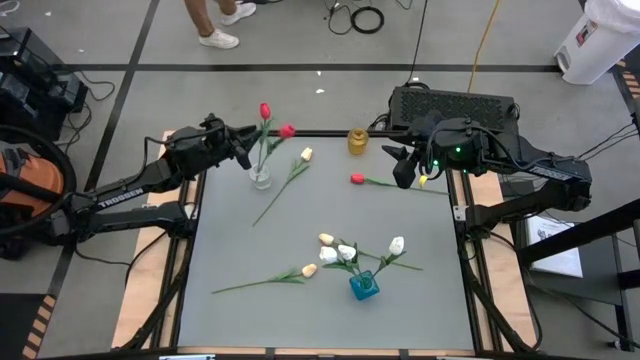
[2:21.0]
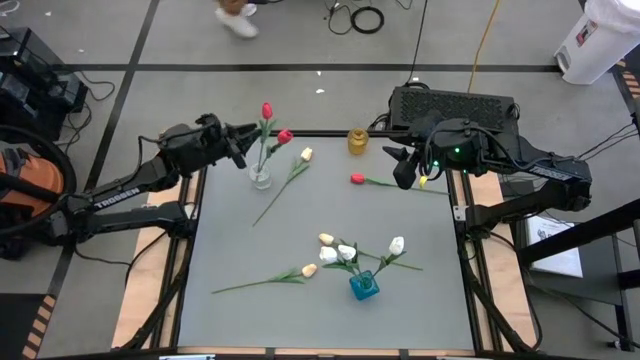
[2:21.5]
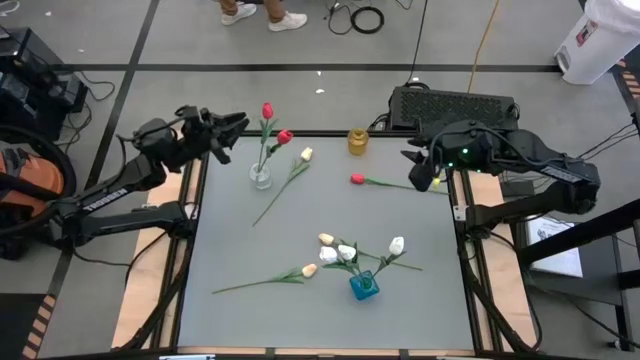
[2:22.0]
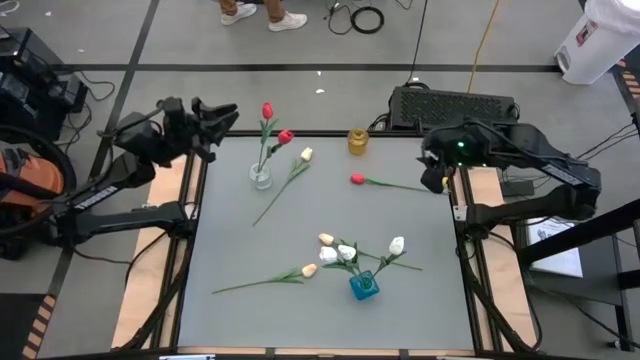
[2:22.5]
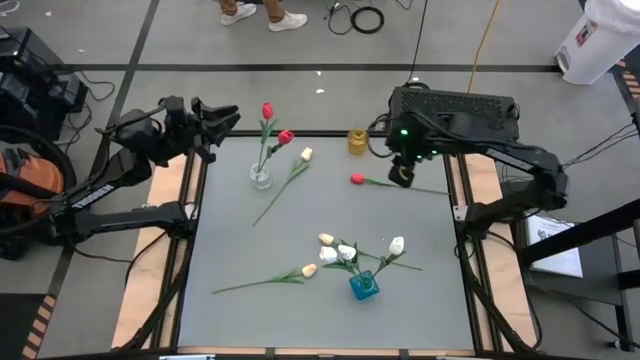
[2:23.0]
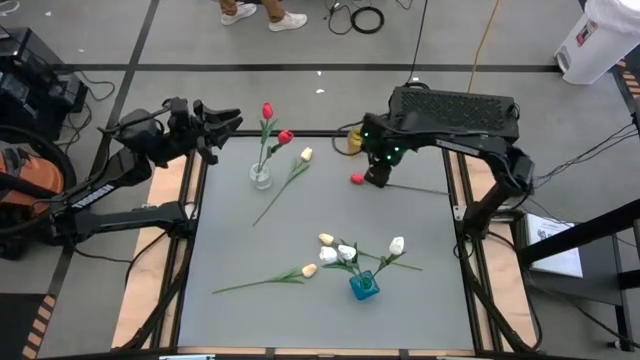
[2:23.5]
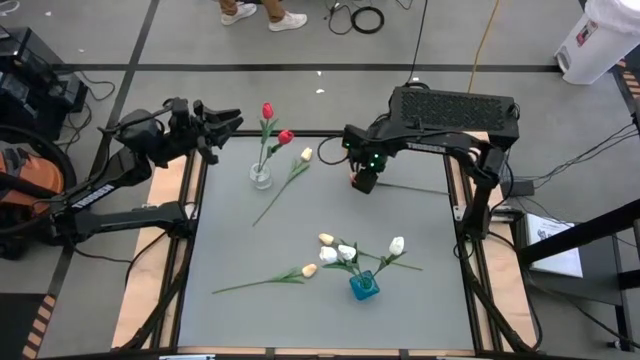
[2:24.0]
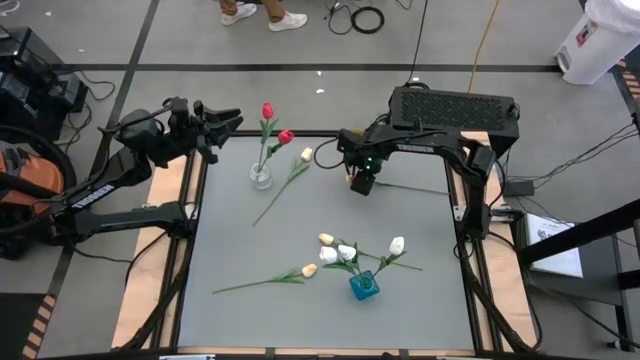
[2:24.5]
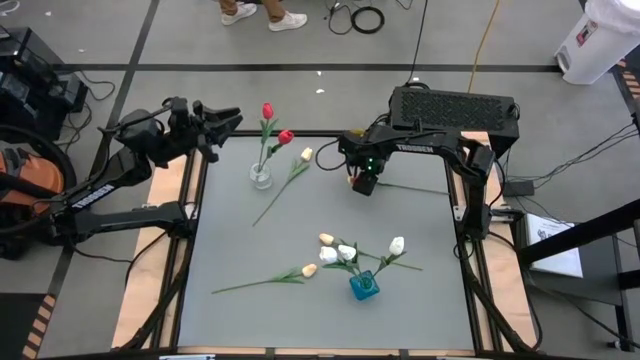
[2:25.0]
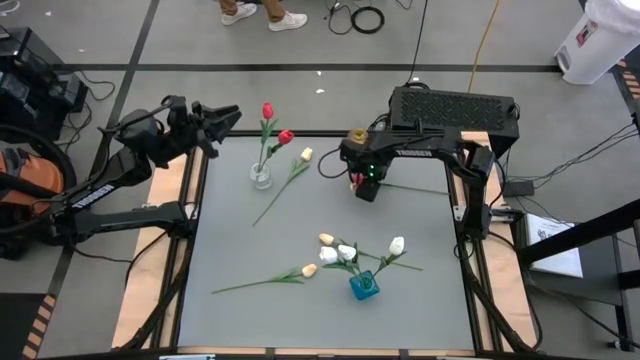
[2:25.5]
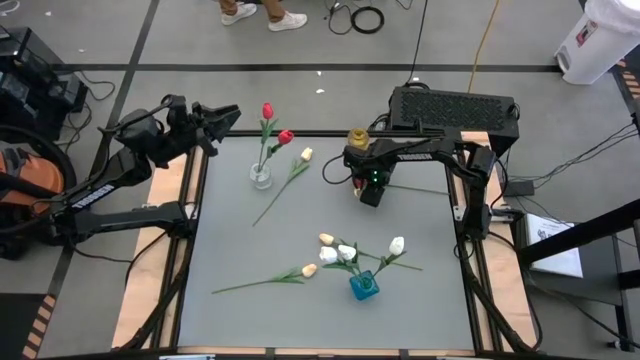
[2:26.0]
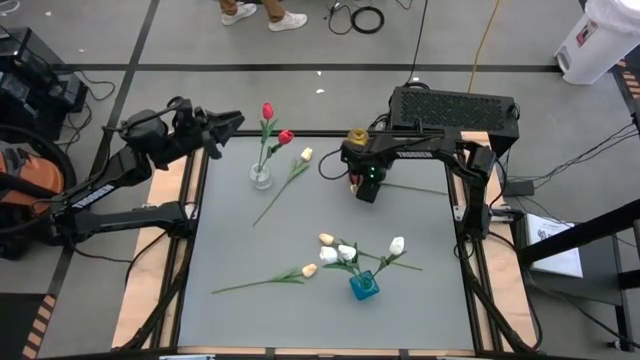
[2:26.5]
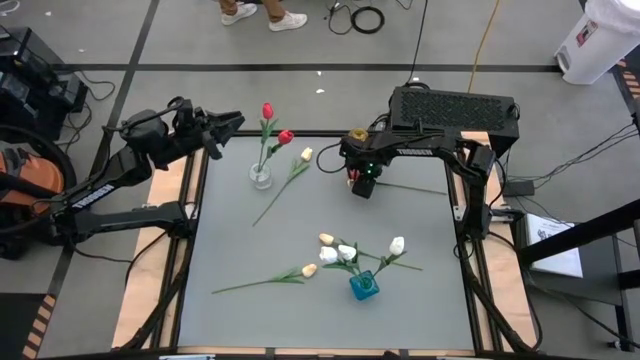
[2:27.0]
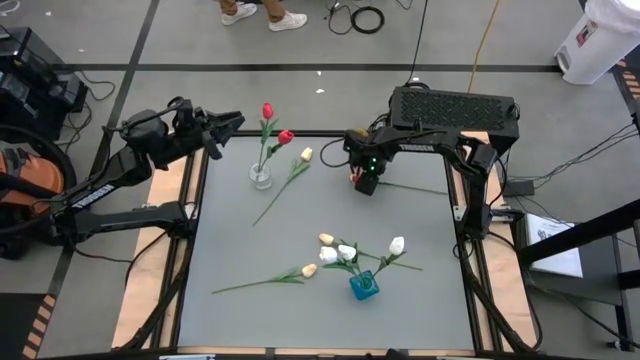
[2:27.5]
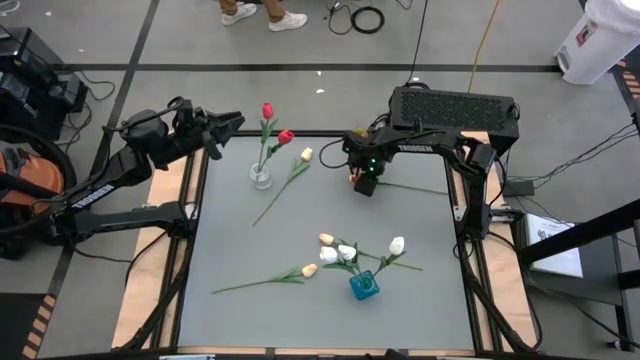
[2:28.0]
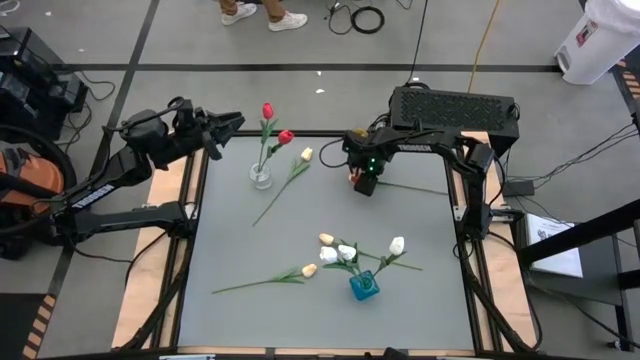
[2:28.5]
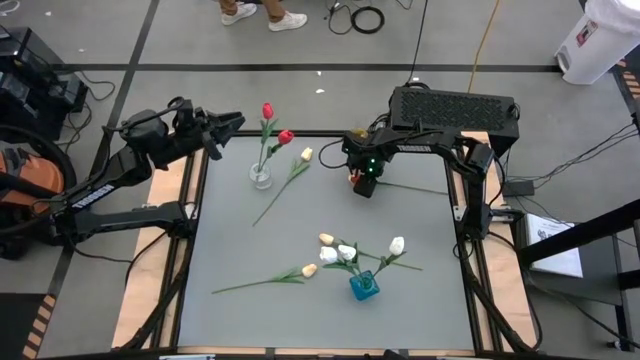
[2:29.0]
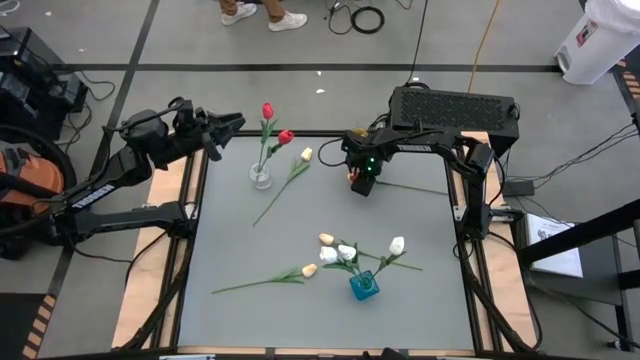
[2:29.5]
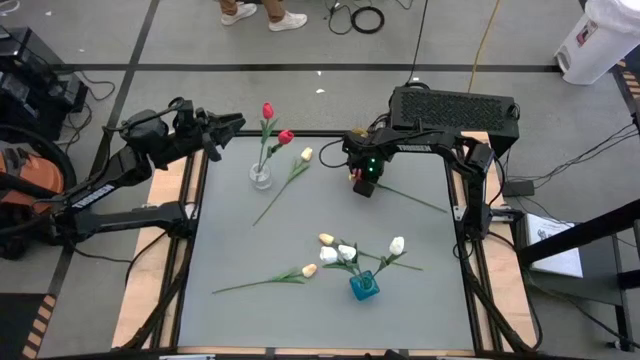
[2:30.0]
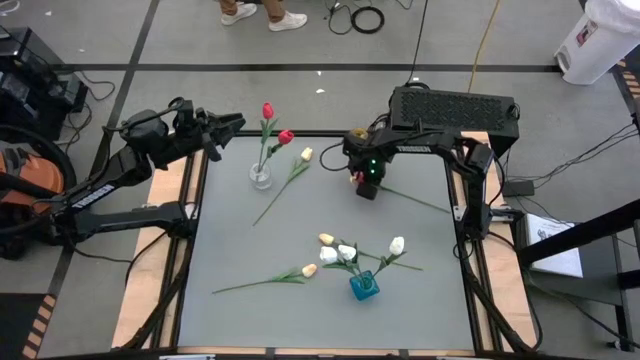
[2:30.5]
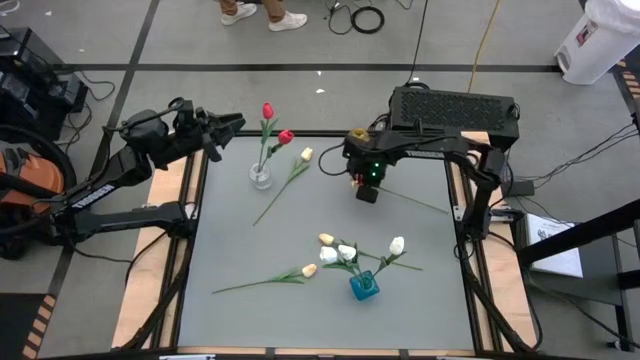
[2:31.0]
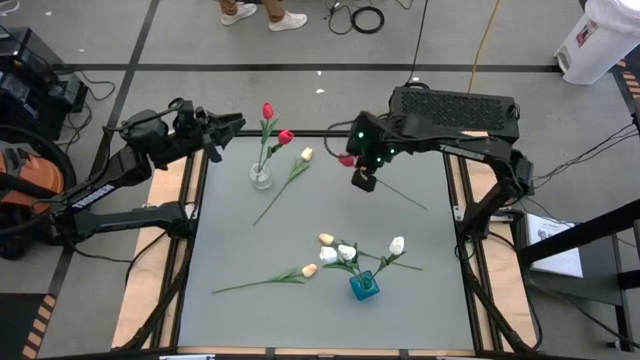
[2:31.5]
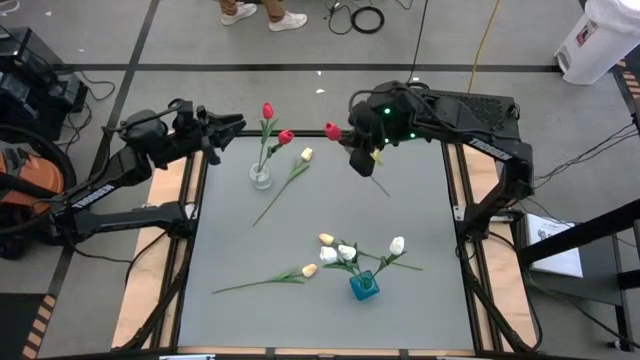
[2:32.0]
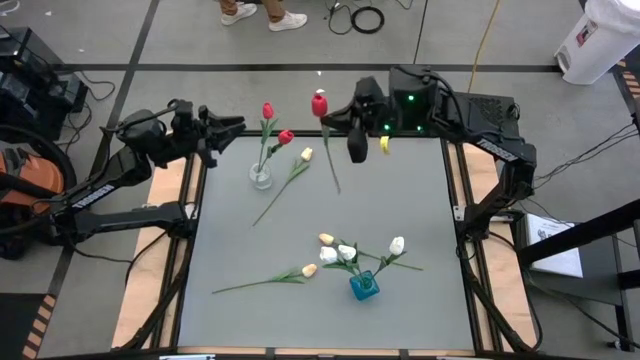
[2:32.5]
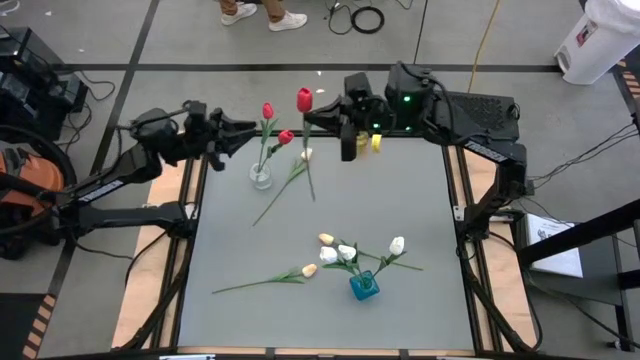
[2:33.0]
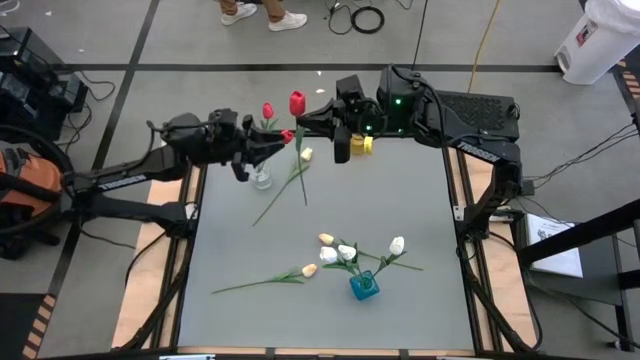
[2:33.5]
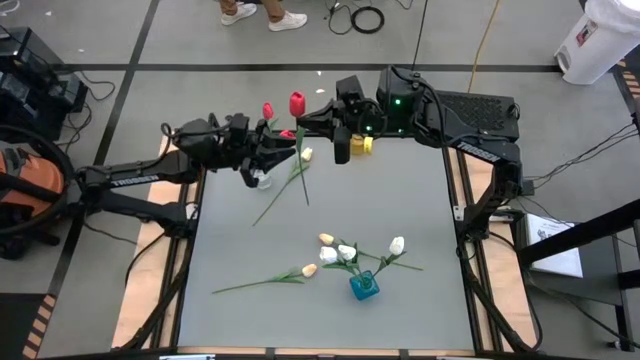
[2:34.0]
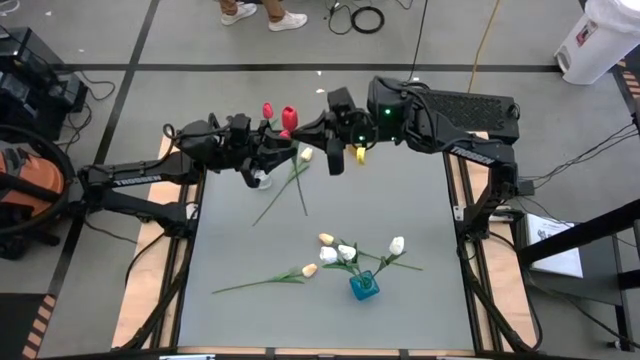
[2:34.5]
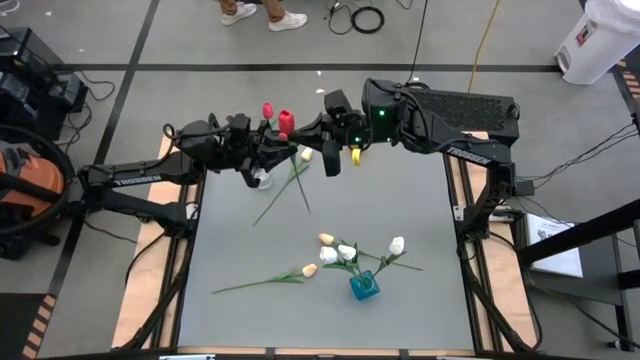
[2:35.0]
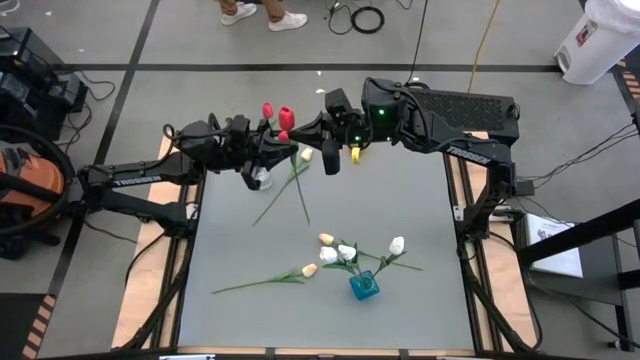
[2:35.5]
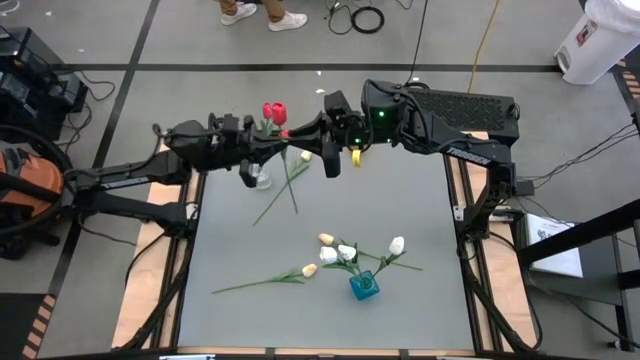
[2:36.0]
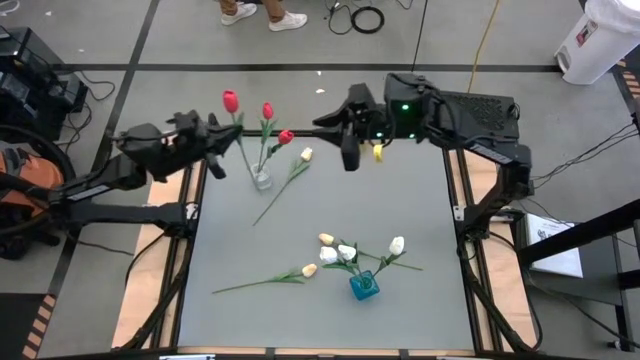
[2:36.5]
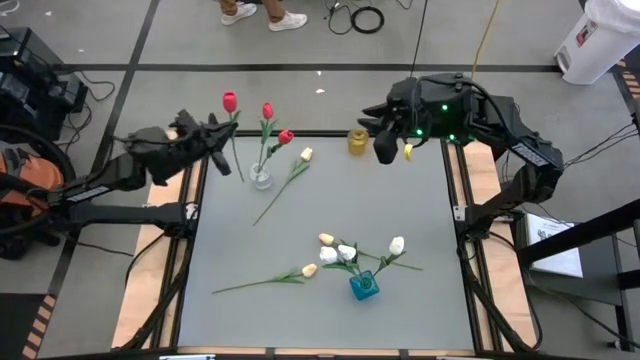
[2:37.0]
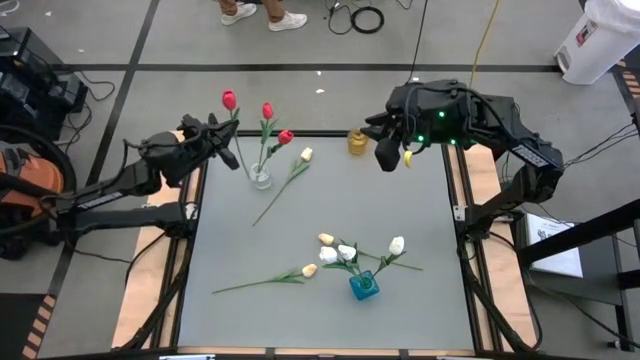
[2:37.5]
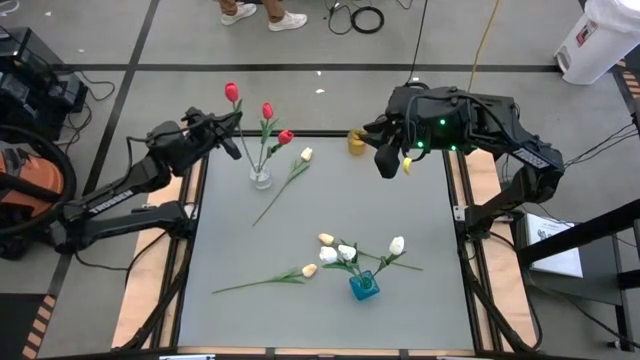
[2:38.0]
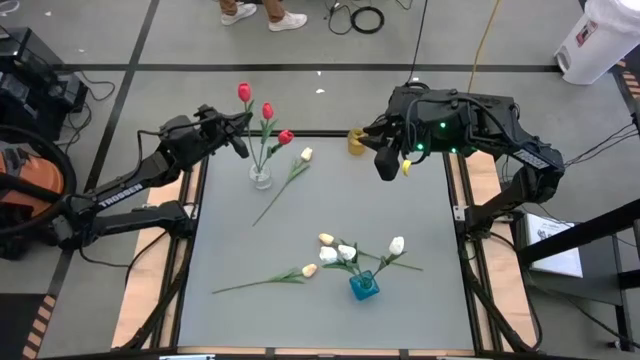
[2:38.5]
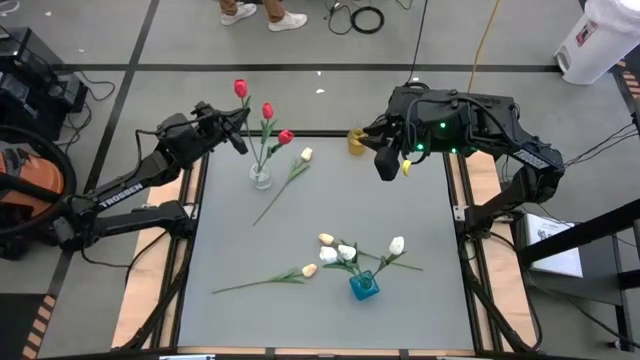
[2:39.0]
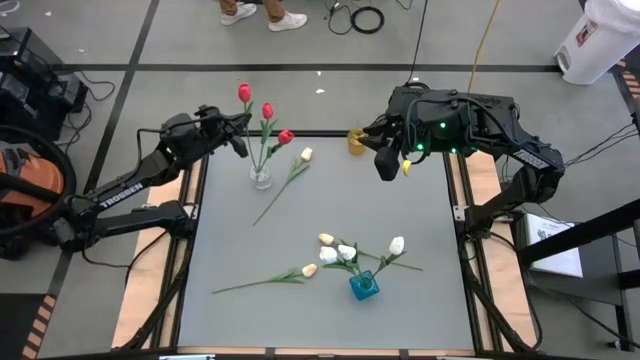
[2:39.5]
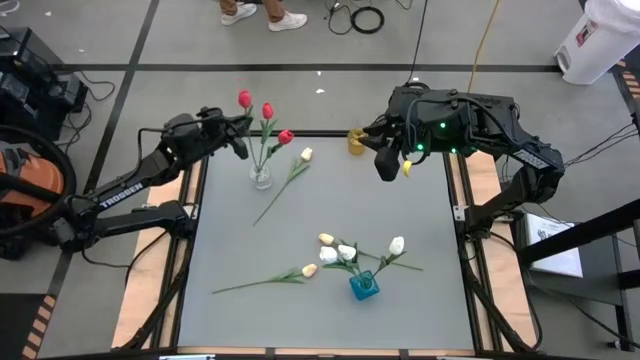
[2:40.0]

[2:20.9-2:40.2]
Task: Sort flowers into vase by color
Put the red tulip into the transparent vase

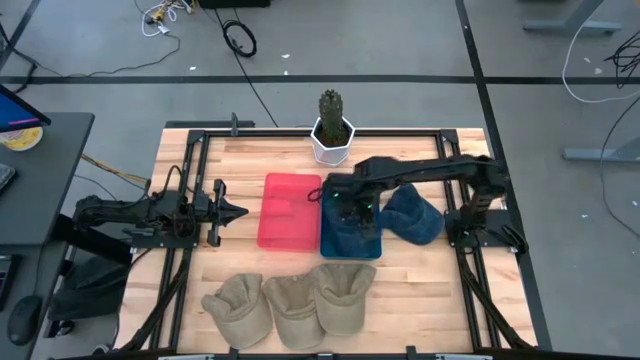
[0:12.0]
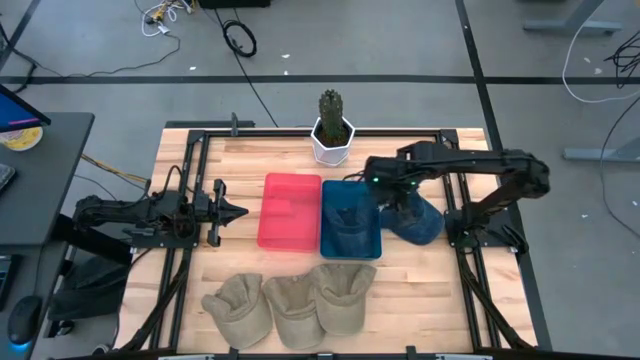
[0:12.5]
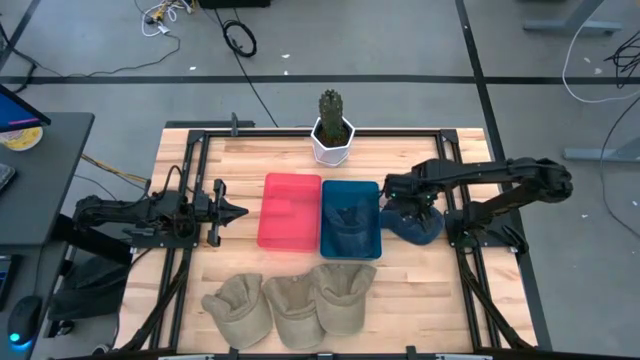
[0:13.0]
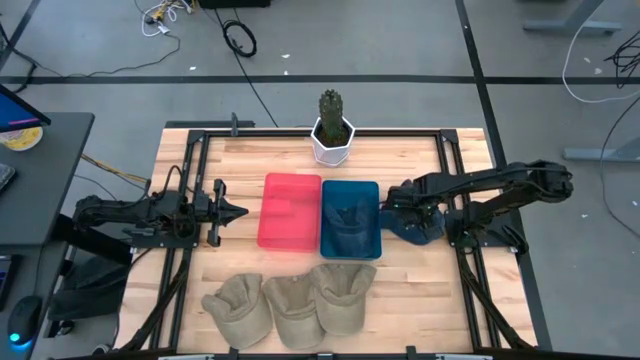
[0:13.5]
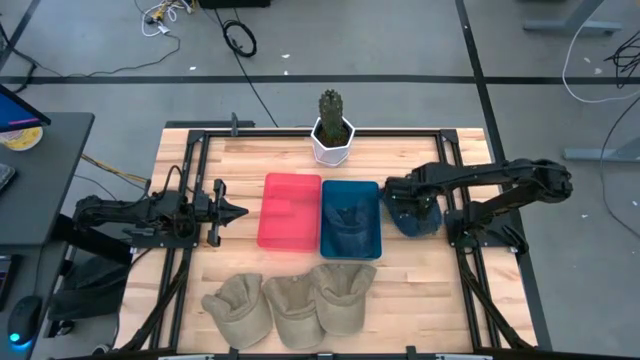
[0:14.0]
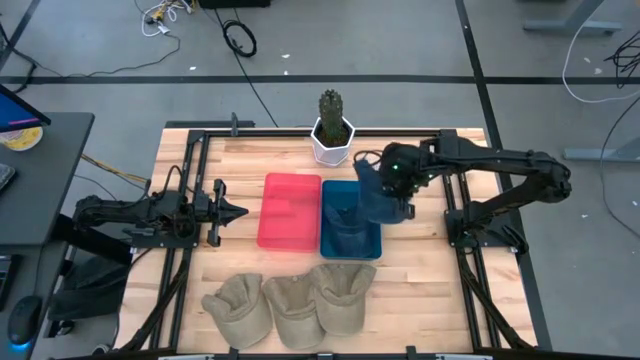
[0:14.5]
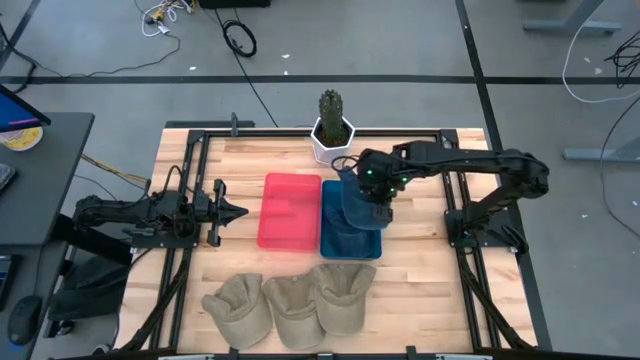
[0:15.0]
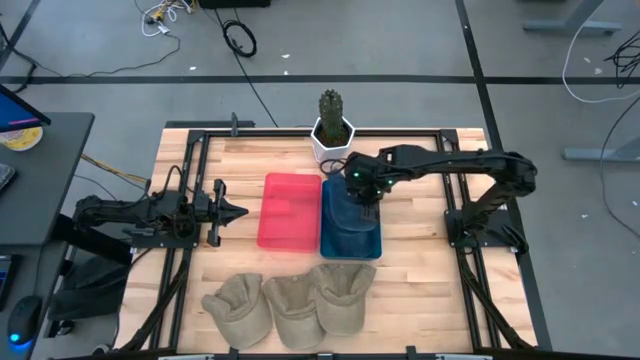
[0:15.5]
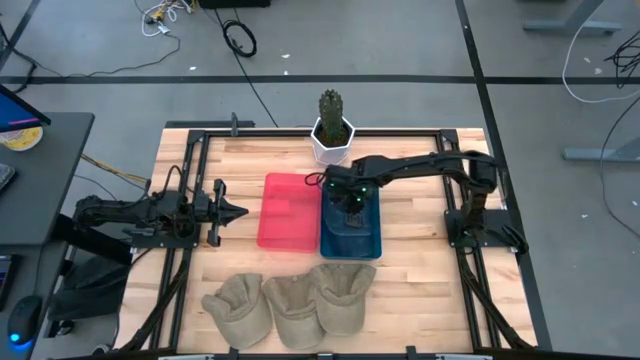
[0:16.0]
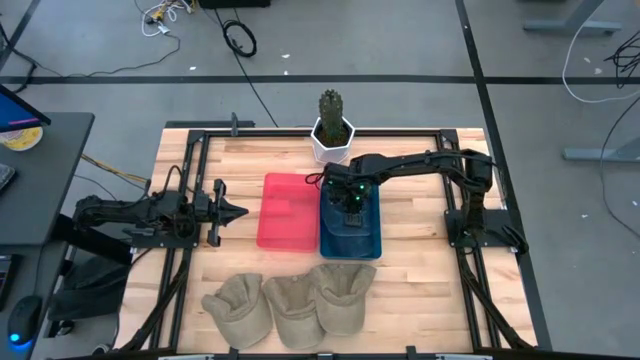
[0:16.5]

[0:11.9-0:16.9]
Task: Pick & Place hat
Put the blue cap into the blue bin
